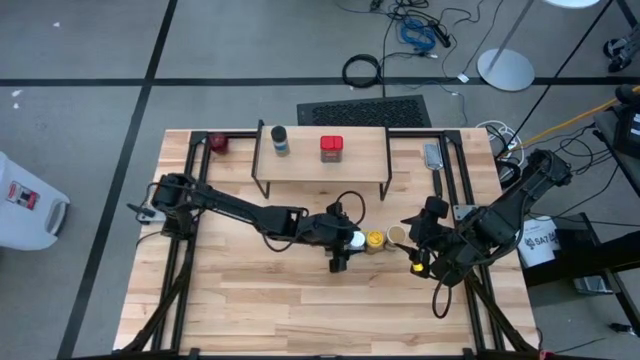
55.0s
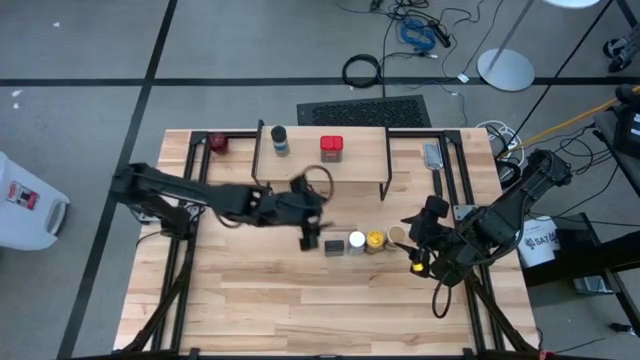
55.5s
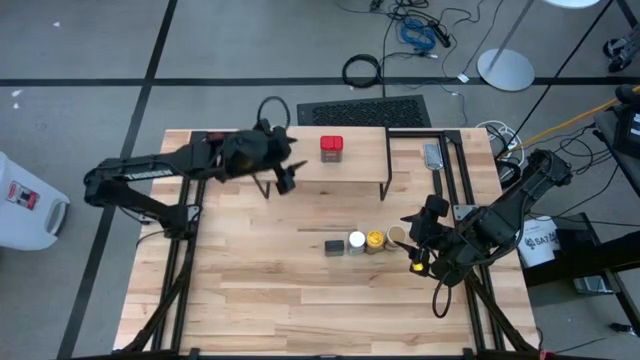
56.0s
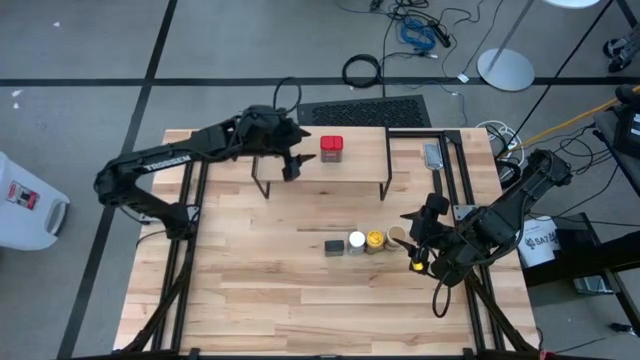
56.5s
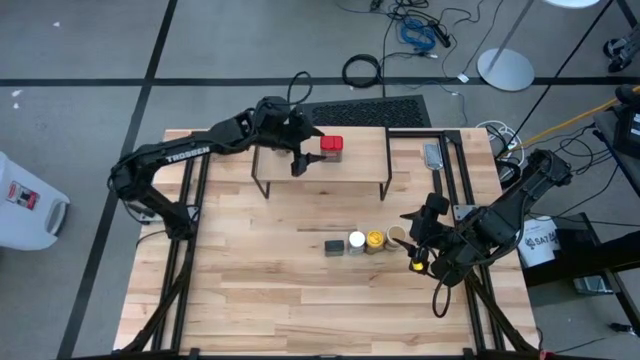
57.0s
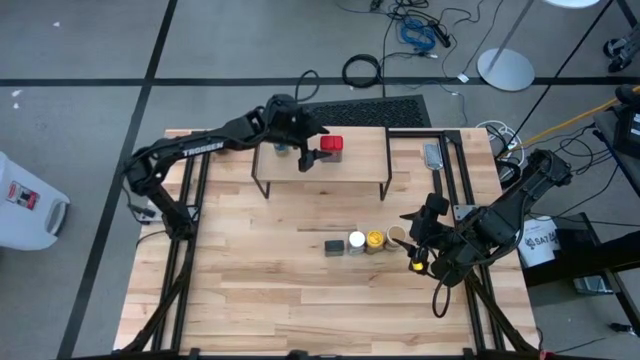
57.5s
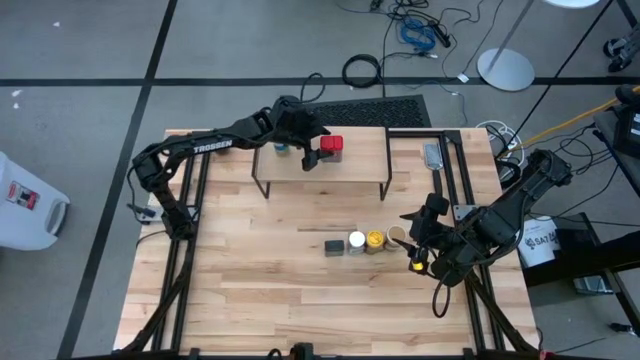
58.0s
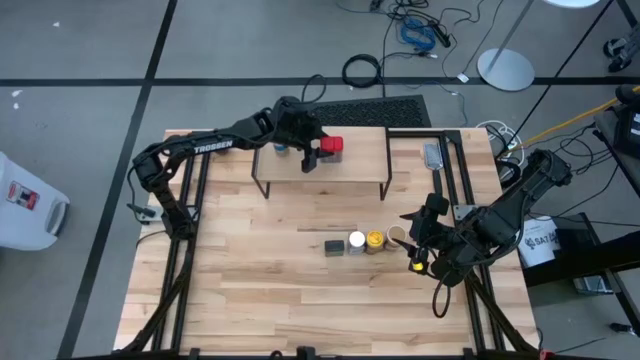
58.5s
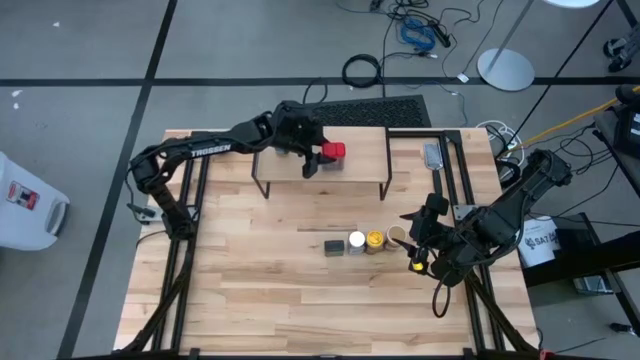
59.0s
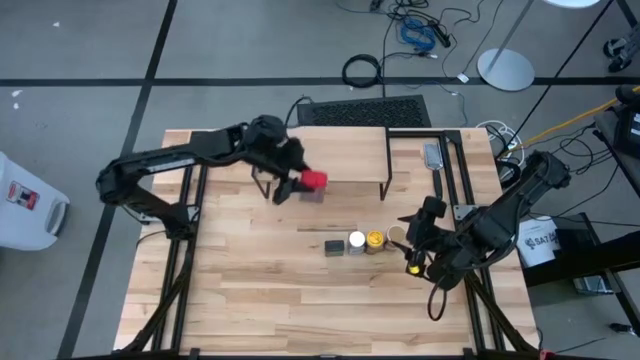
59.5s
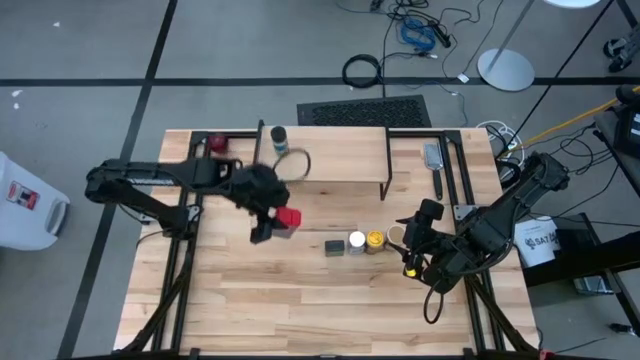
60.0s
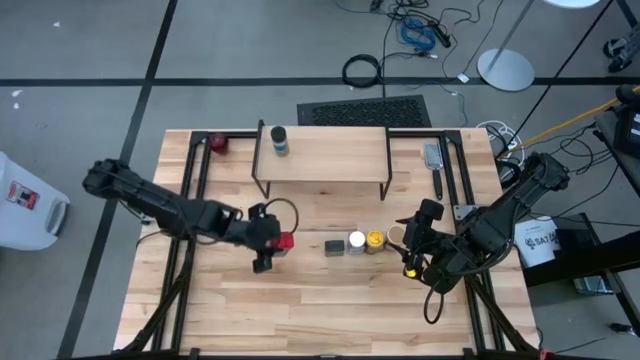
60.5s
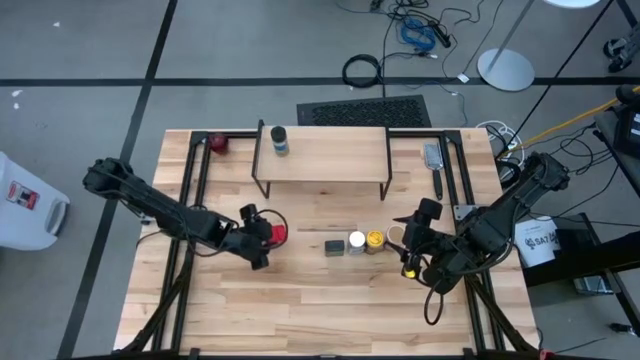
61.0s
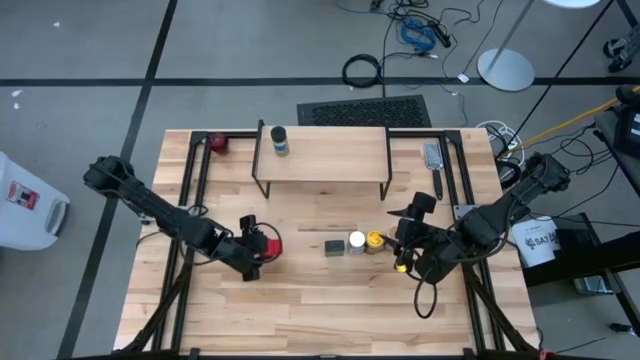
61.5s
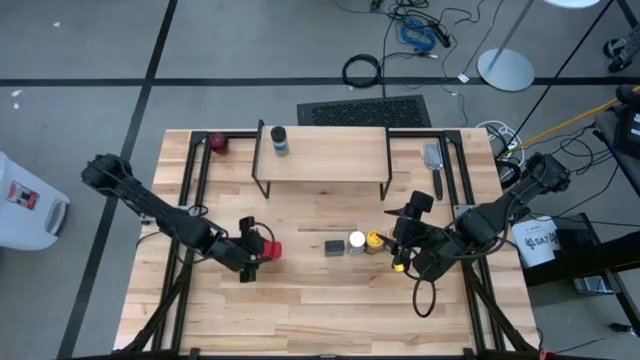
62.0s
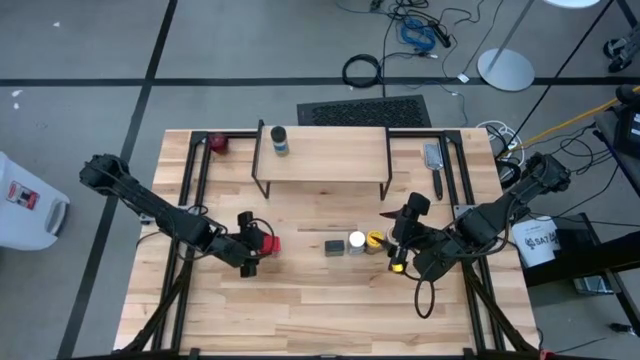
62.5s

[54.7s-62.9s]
Task: Shelf spices
Remove the red seasoning can from the shelf

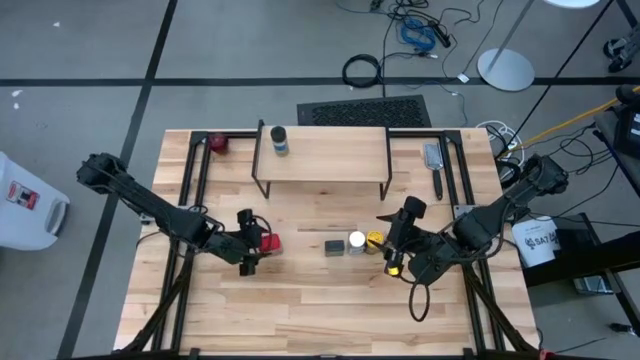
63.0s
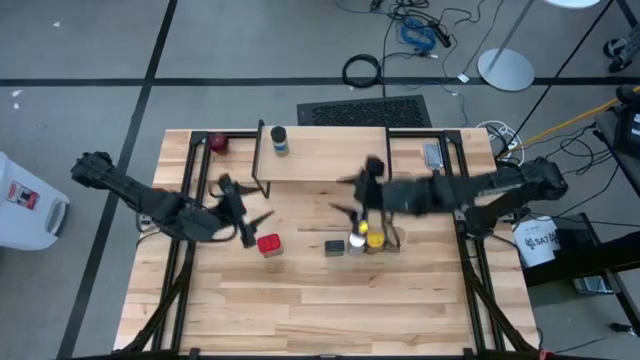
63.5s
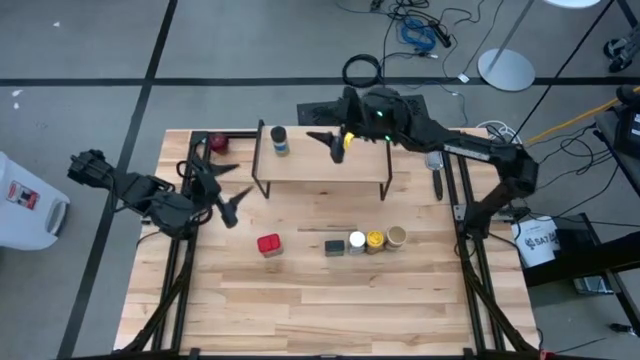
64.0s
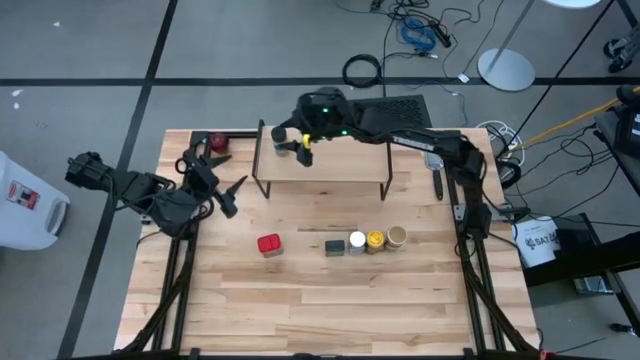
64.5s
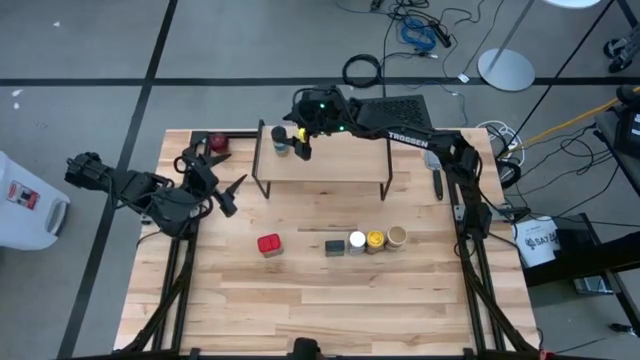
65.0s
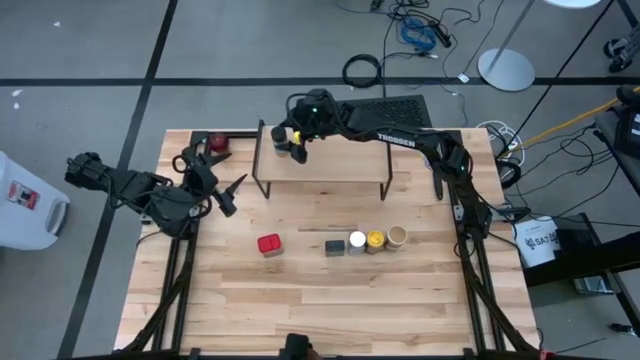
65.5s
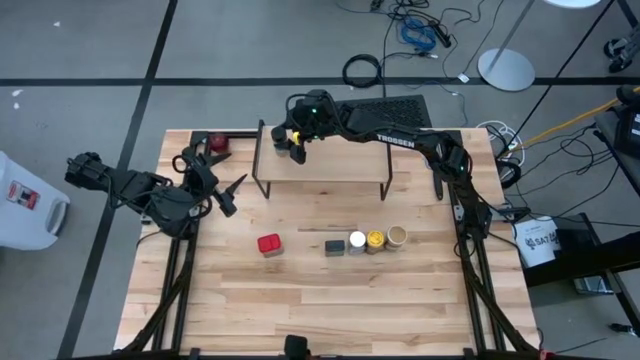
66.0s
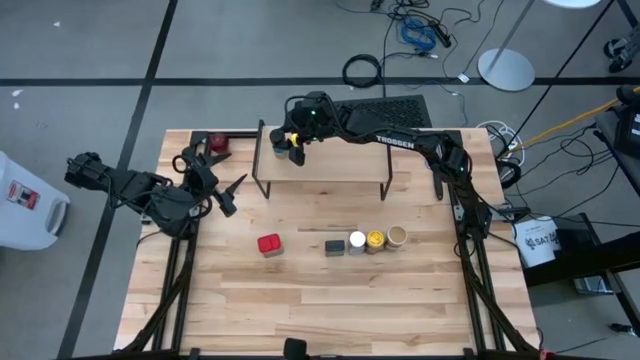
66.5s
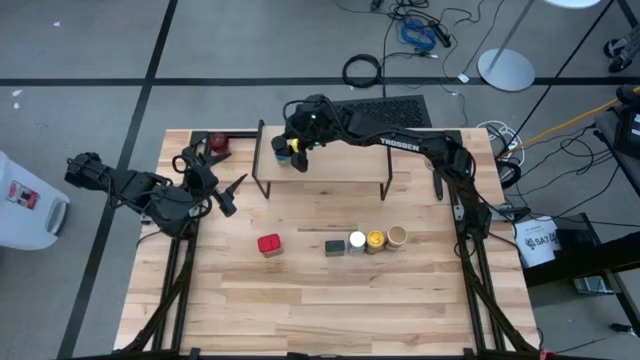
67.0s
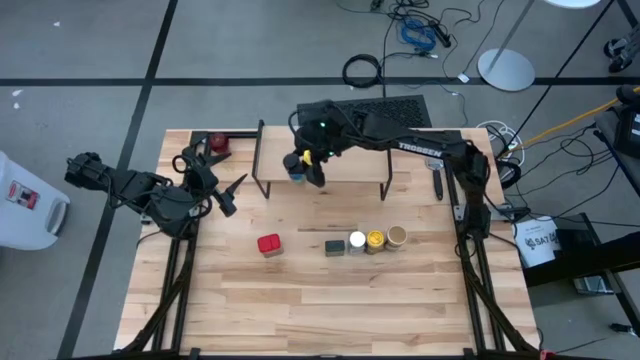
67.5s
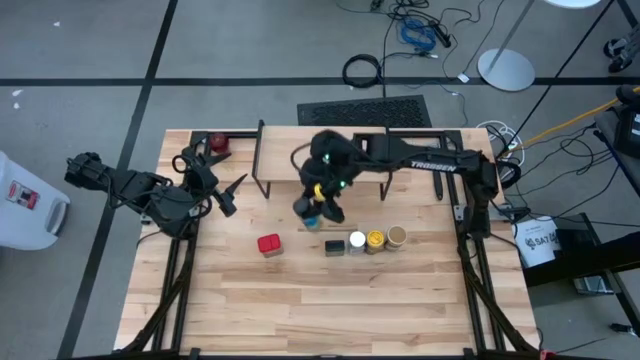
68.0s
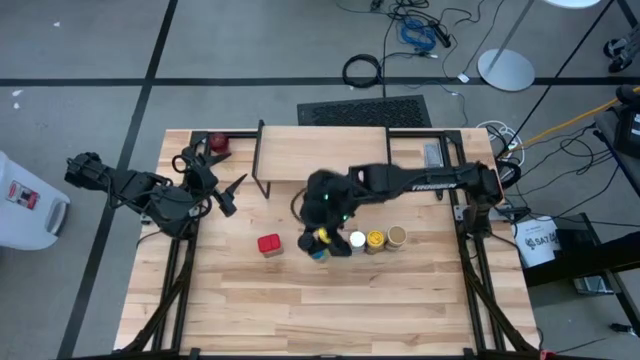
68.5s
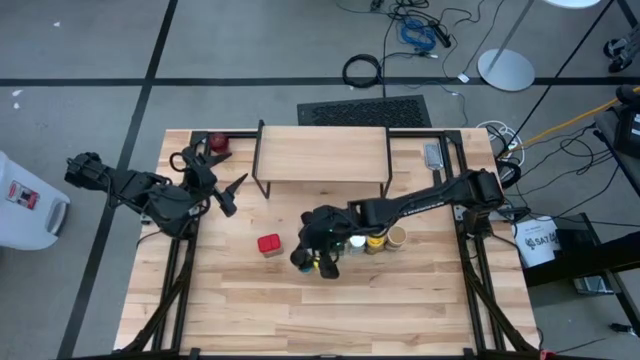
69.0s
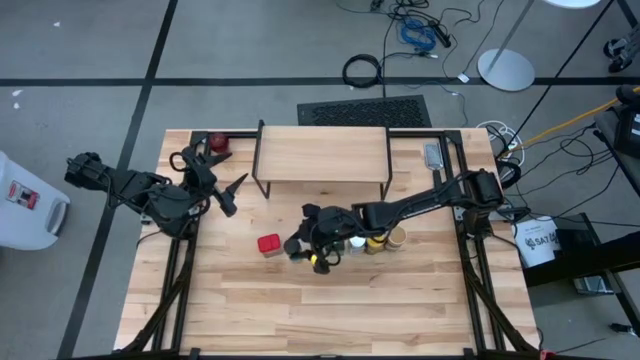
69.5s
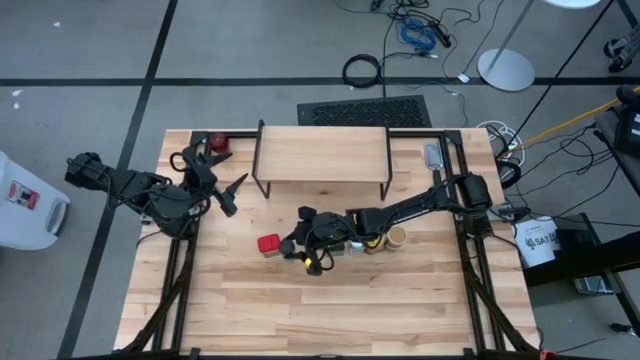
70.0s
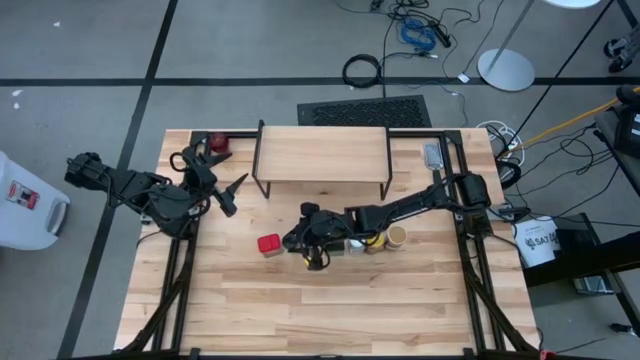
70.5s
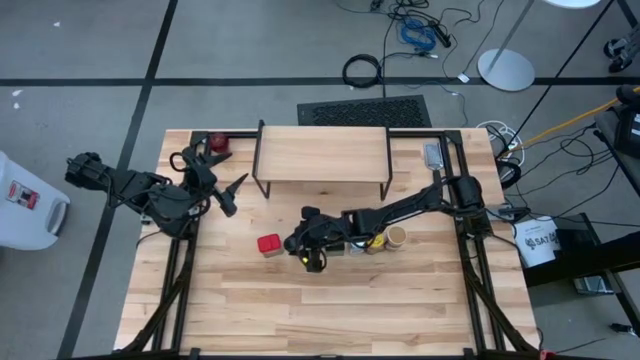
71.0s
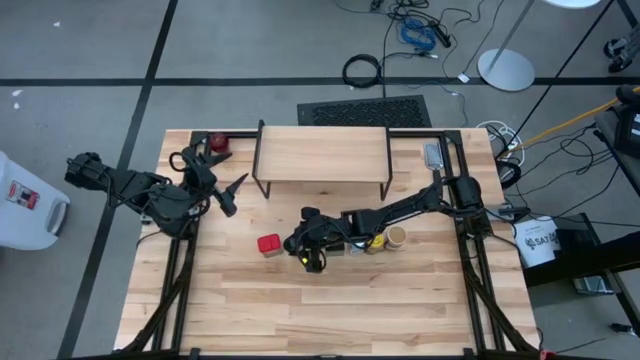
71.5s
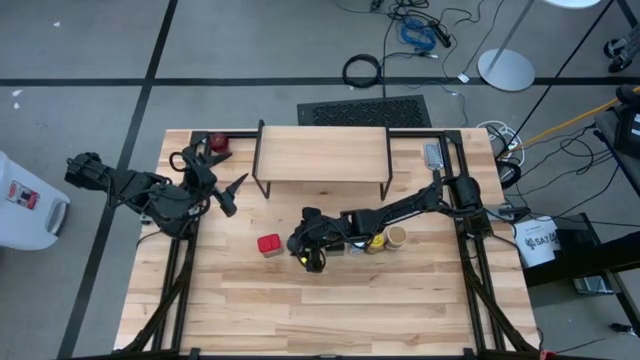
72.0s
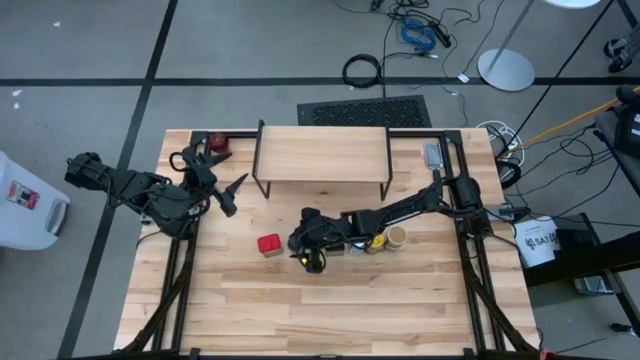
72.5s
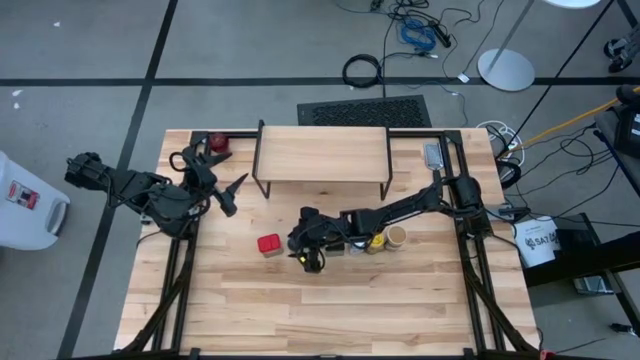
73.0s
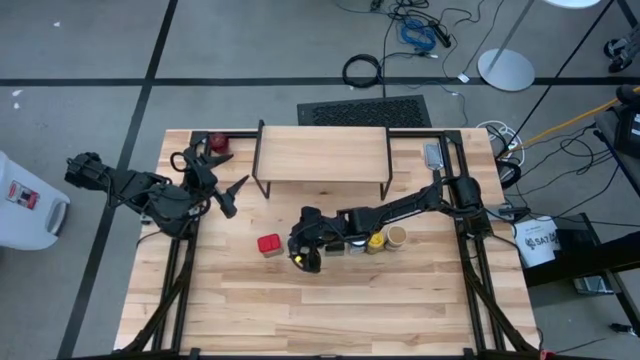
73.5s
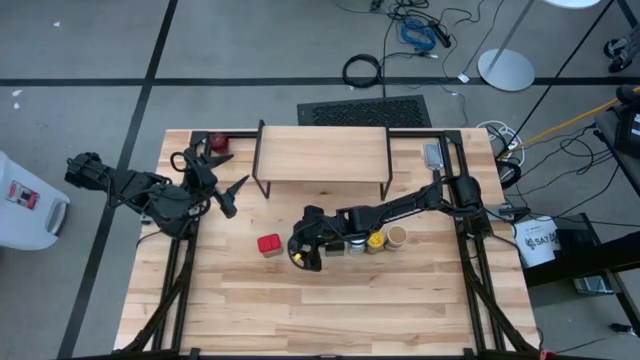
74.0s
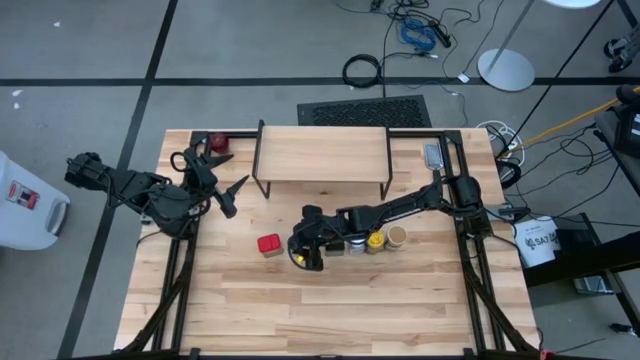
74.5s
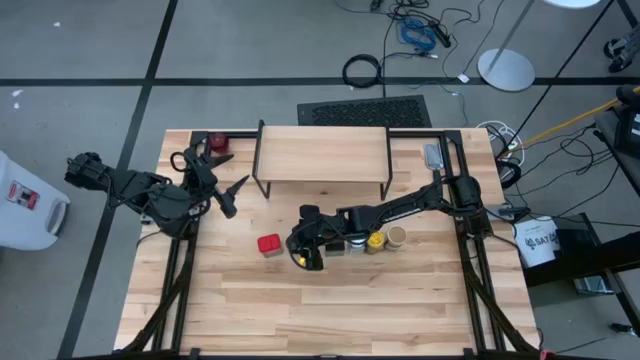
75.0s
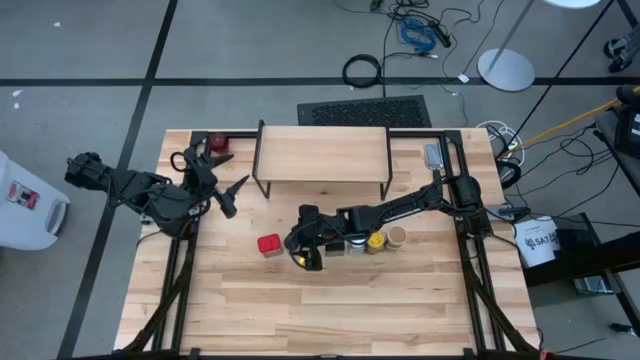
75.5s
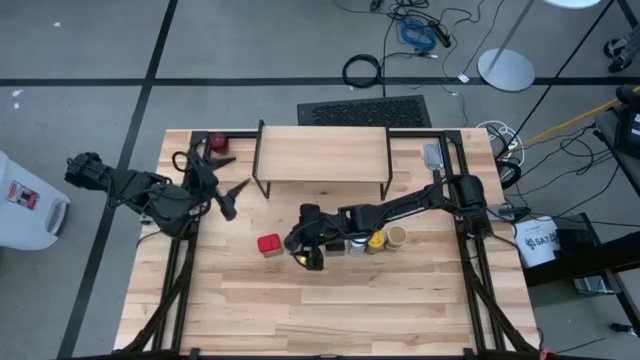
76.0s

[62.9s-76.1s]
Remove the black seasoning bottle from the shelf
